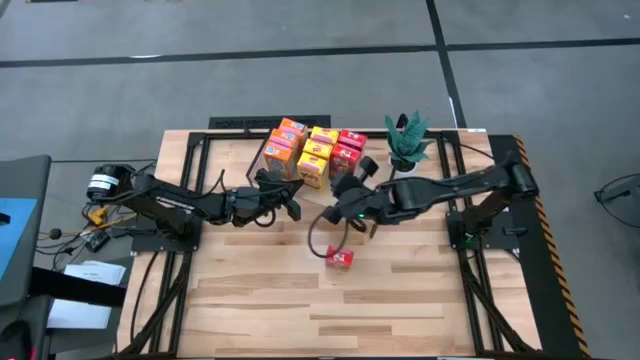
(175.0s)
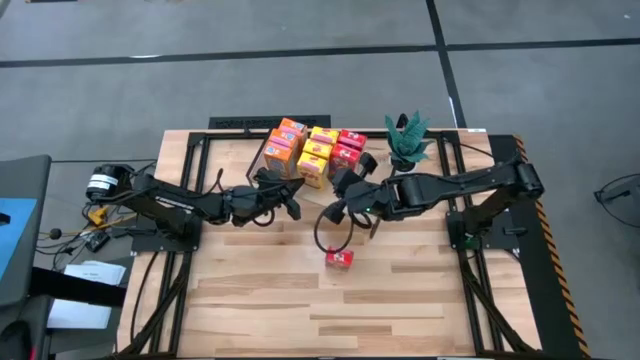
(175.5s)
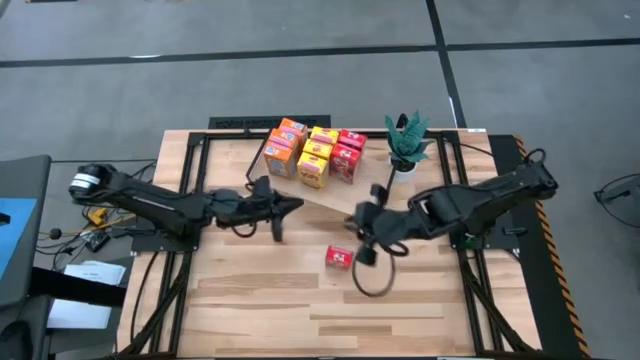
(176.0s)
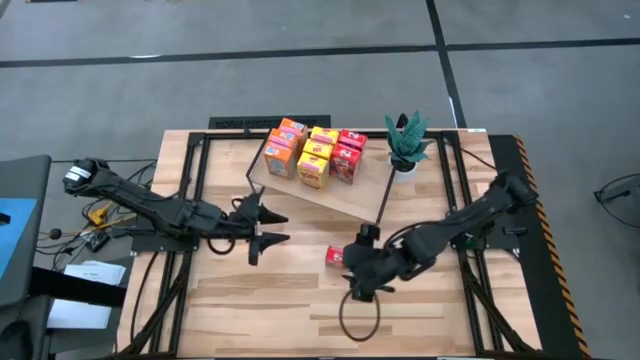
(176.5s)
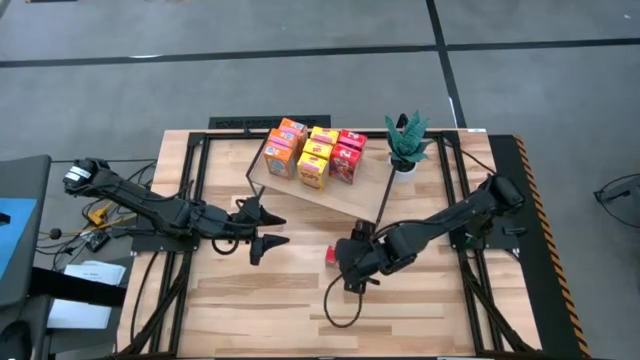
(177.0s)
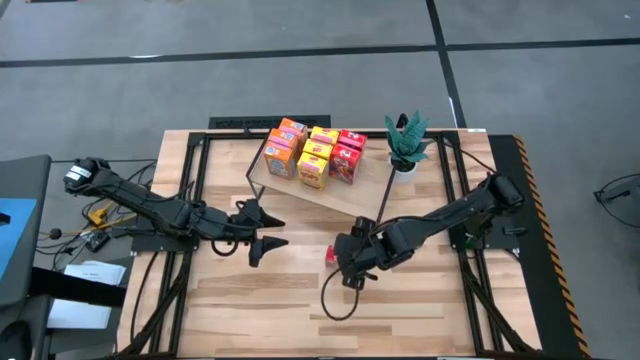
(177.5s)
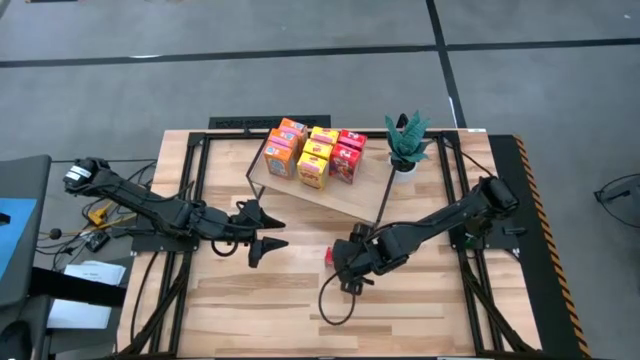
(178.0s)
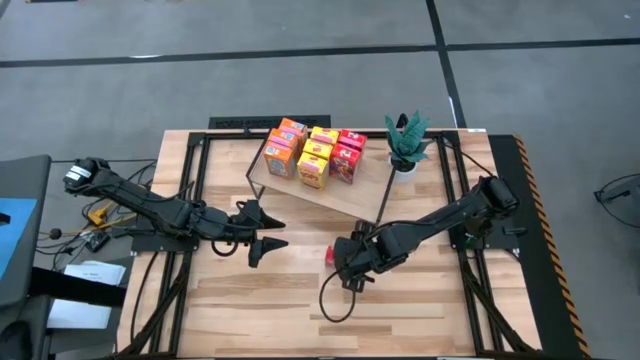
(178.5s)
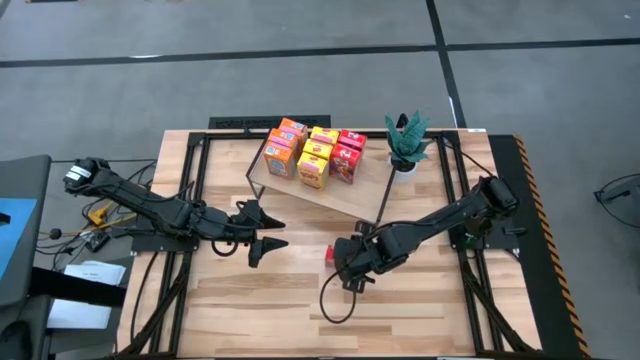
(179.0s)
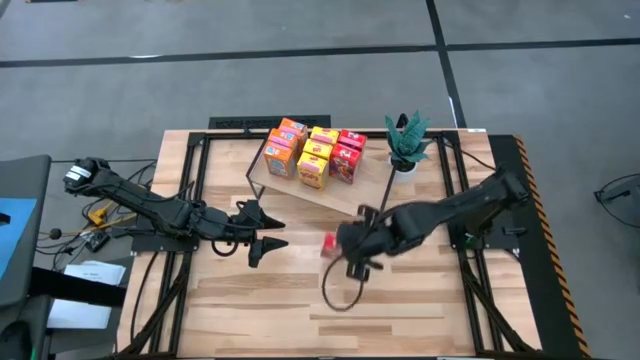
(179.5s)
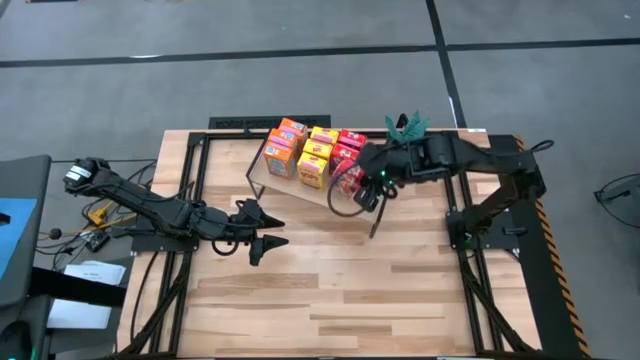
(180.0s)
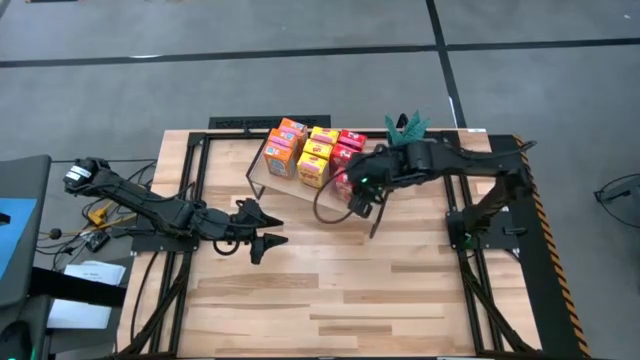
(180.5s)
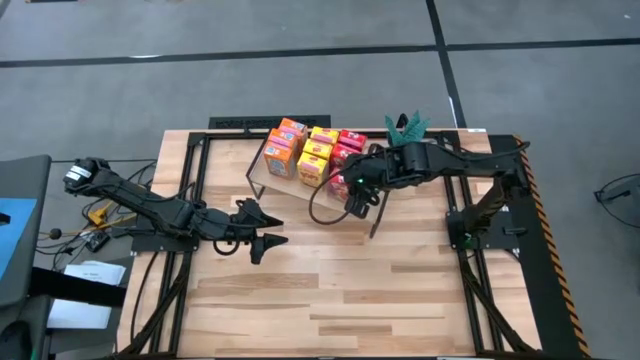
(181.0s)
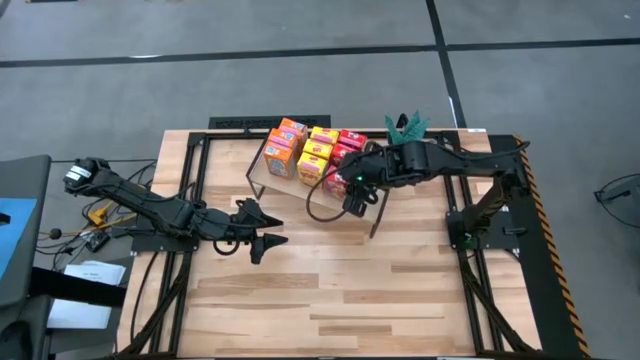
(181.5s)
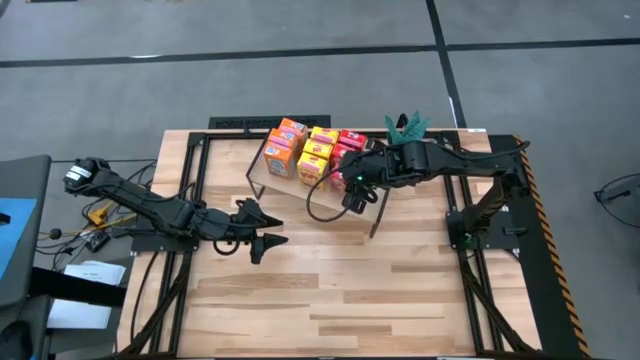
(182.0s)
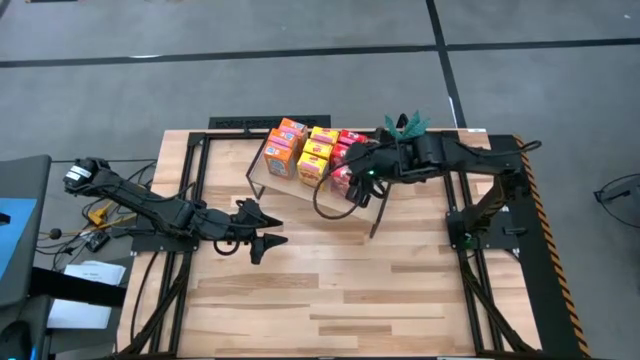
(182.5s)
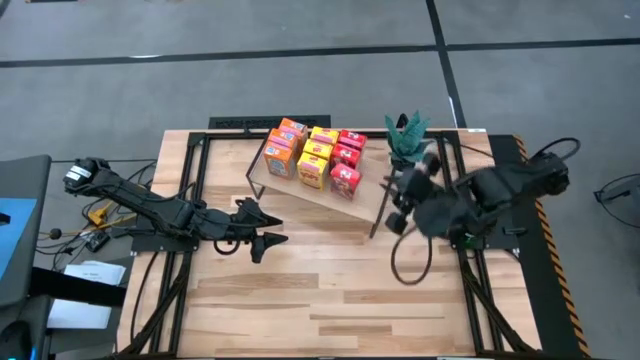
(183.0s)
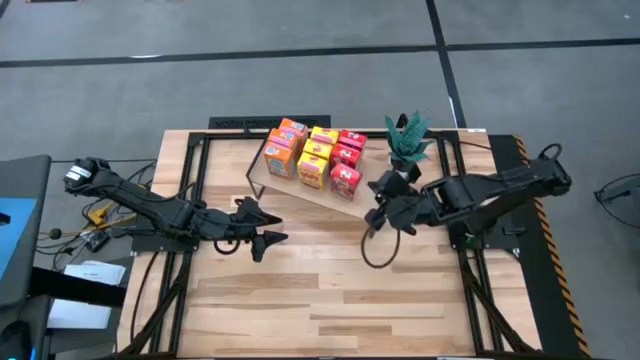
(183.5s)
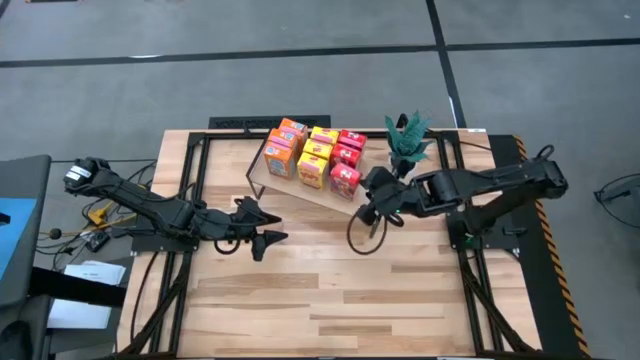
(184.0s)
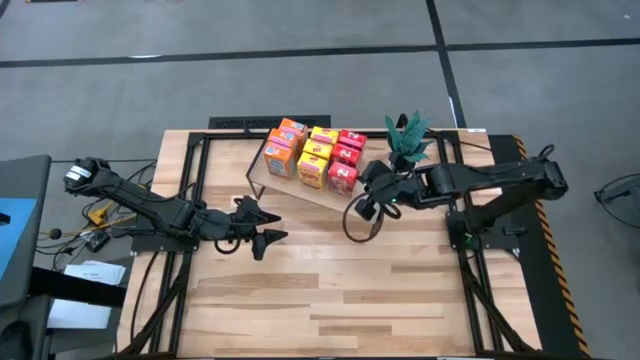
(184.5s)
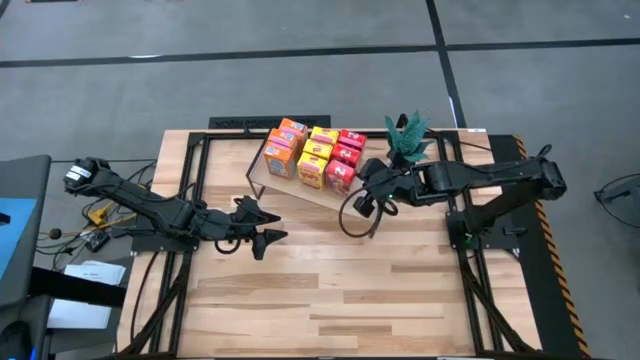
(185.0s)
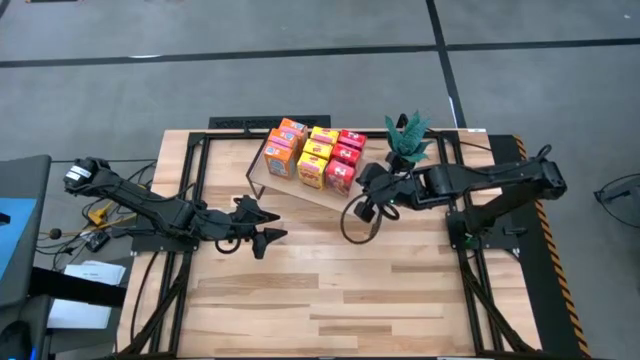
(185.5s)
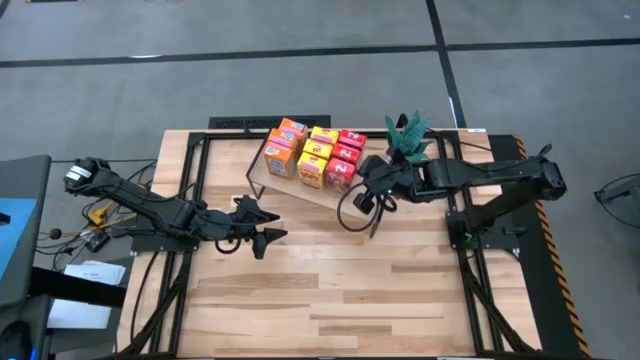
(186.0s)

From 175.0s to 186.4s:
Task: Stack cereal on shelf
Put the red cereal box aligned with the other red cereal box on the shelf

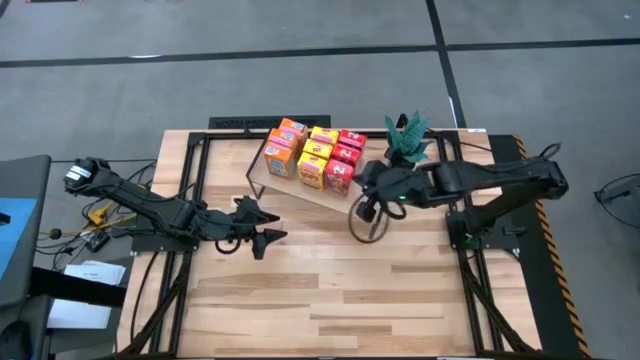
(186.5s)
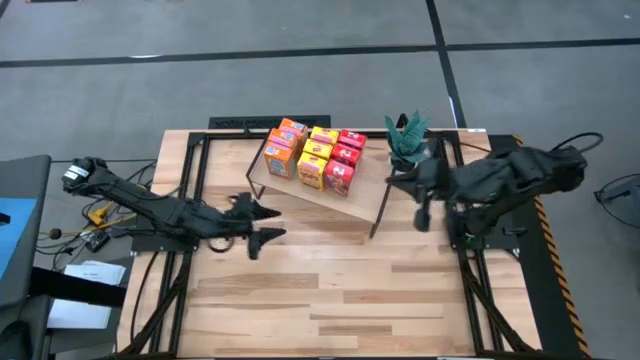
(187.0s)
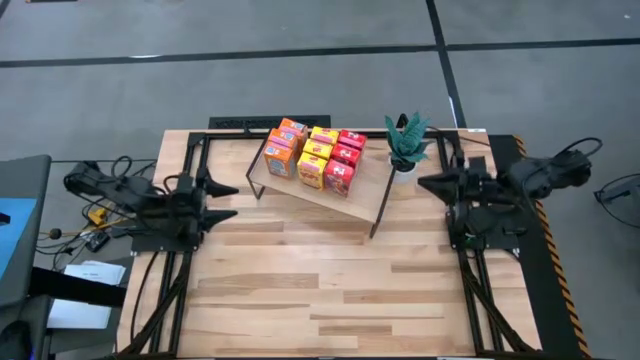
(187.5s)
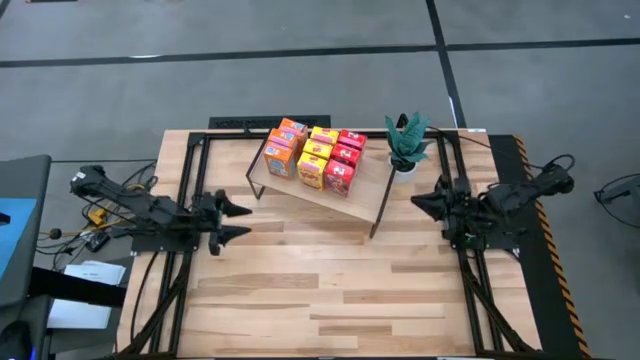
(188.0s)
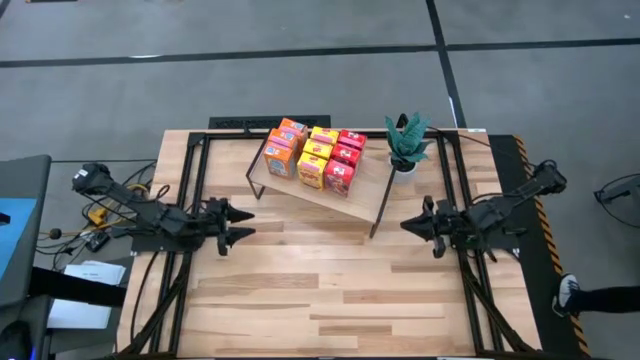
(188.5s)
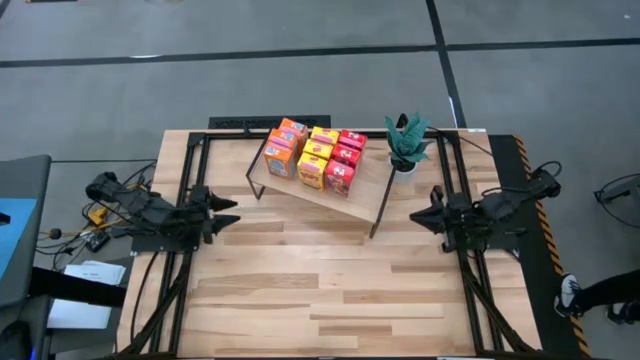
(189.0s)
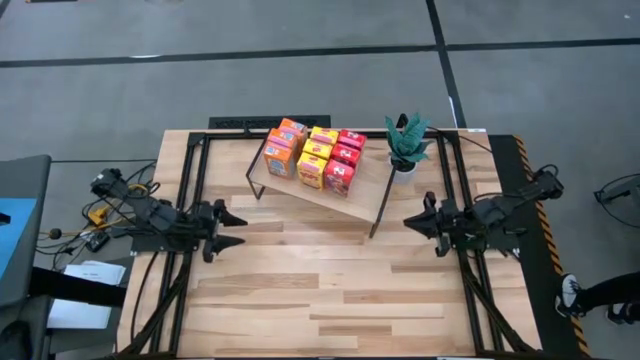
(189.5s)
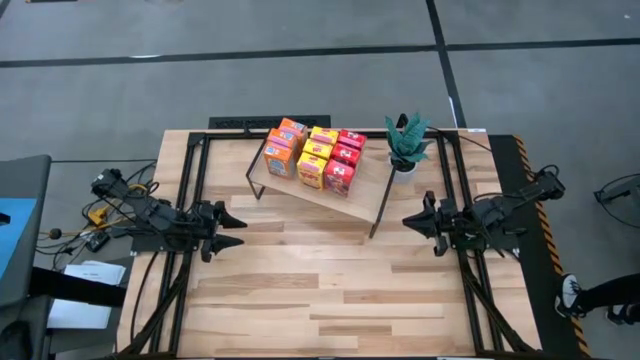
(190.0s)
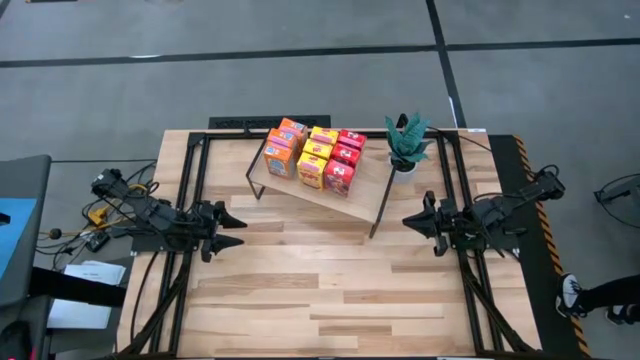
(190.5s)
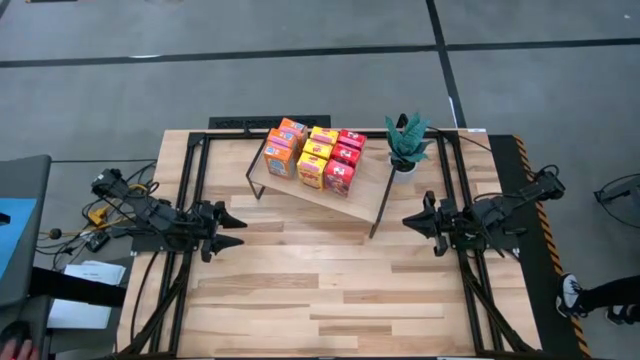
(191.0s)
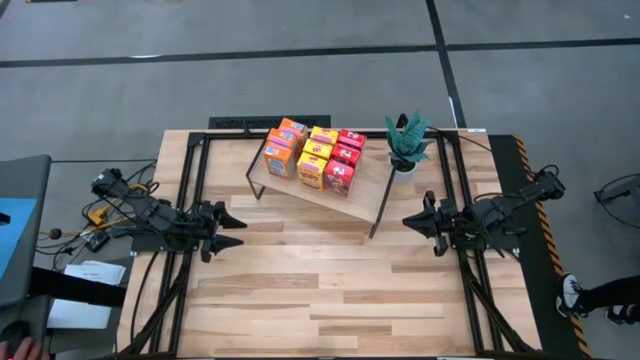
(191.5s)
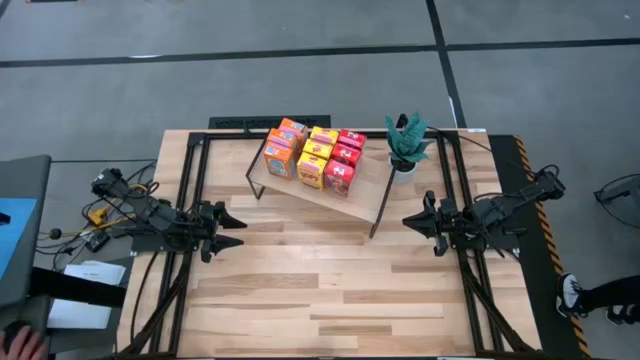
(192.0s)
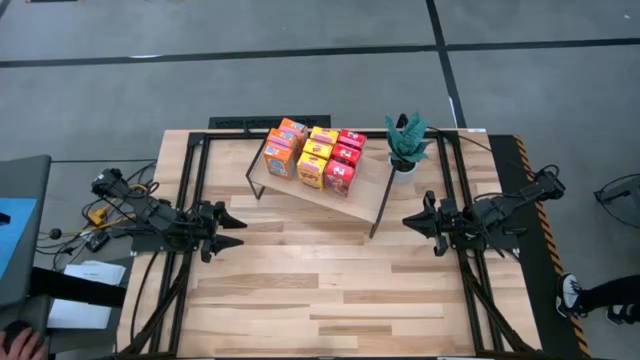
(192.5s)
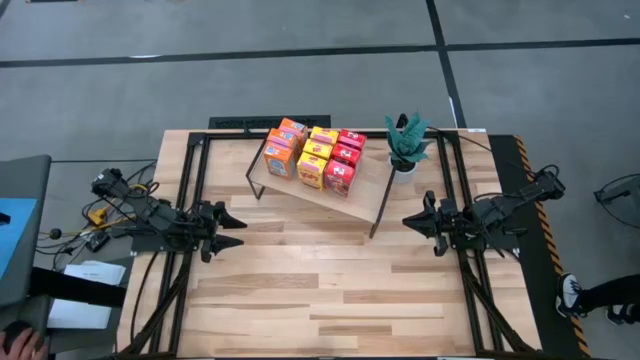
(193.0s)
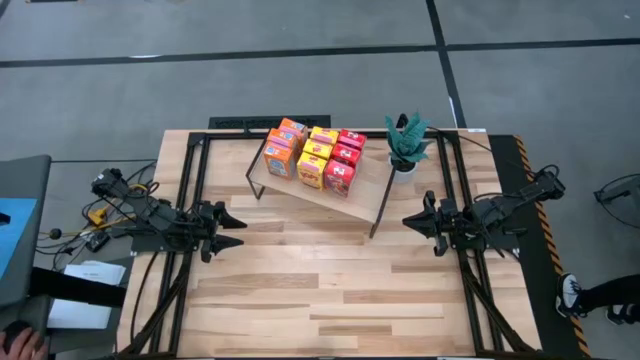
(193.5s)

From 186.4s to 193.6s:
Return to home position

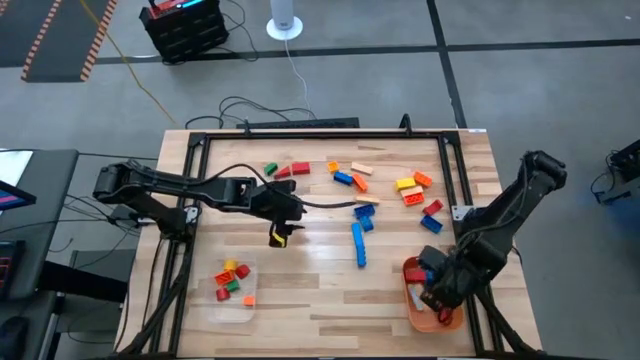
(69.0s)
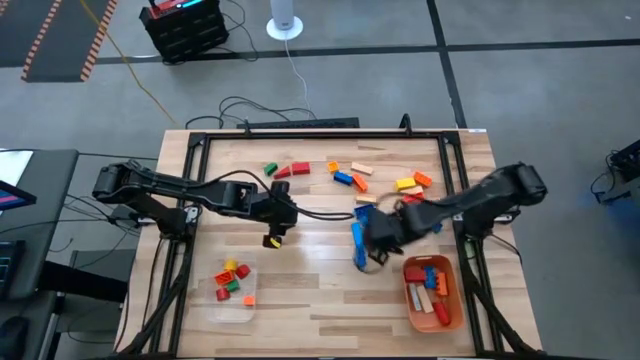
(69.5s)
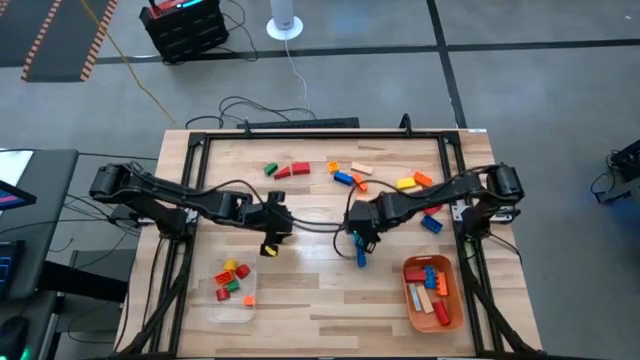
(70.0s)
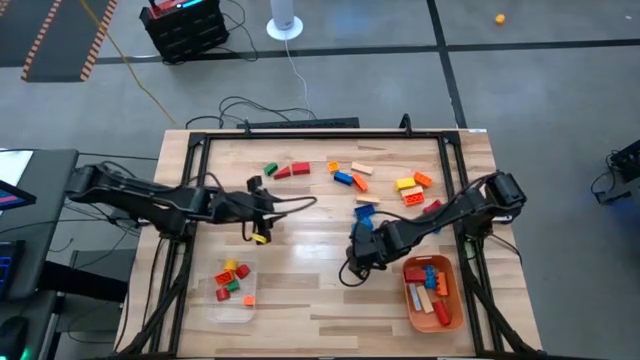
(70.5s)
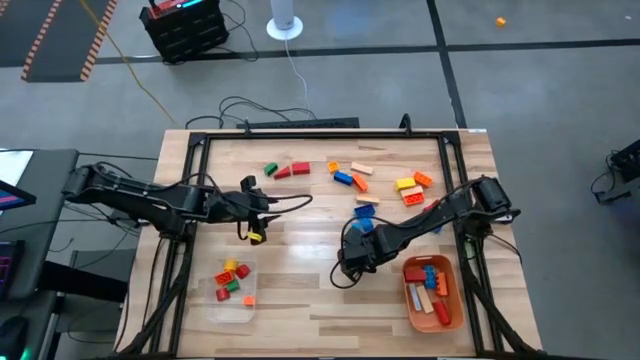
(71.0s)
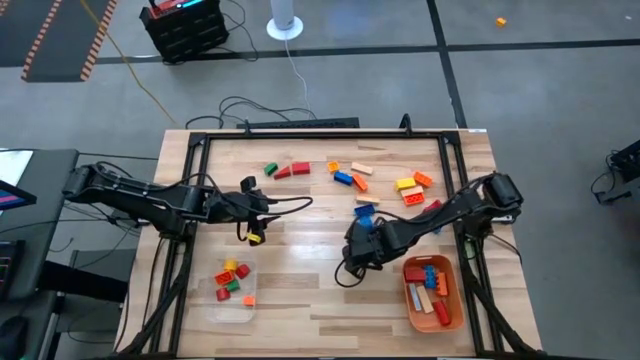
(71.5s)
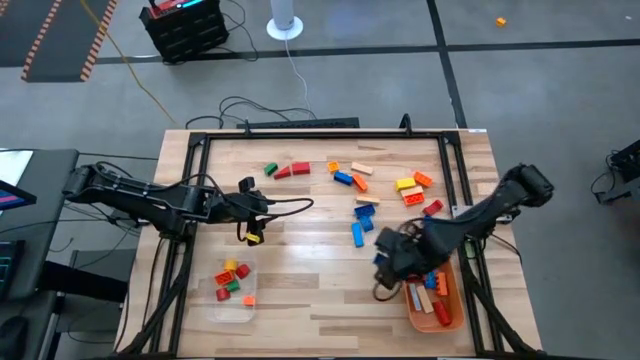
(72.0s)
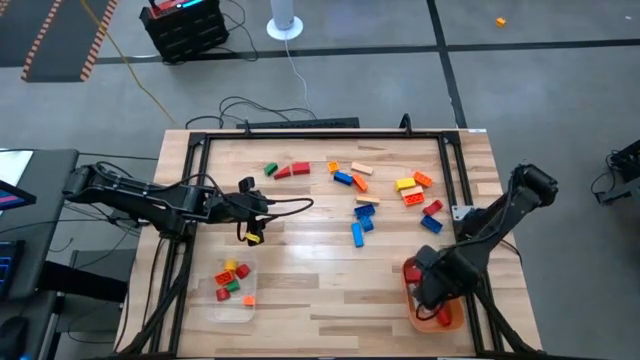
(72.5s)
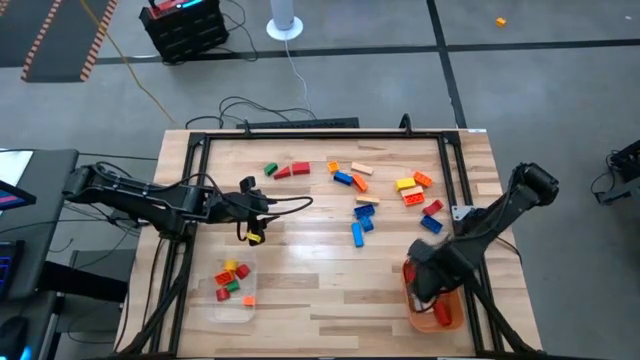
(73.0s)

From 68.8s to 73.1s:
Task: Sort blocks by size
Put the large blue game piece into the orange bin
